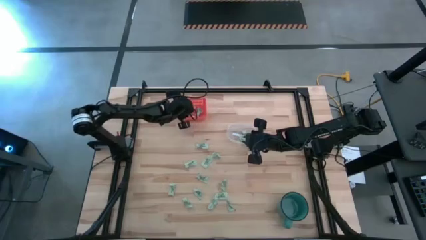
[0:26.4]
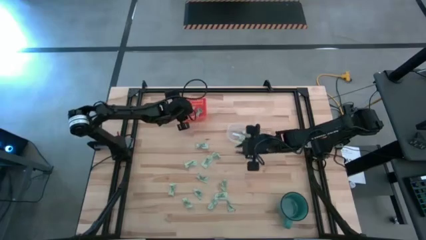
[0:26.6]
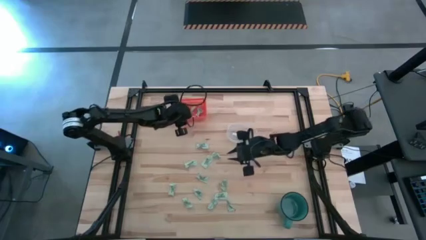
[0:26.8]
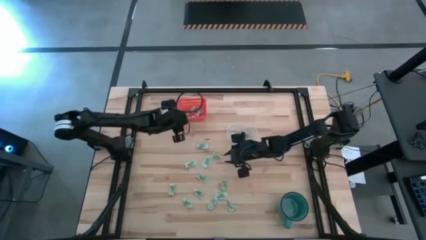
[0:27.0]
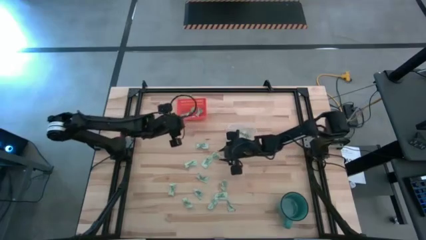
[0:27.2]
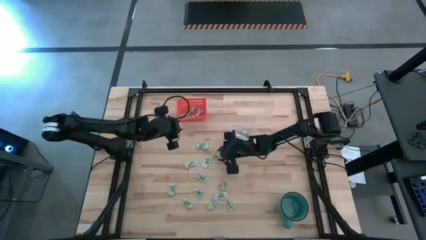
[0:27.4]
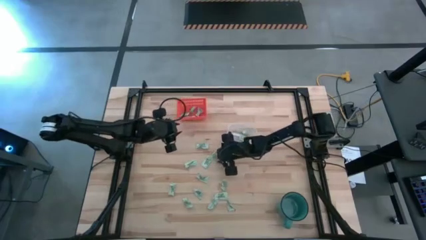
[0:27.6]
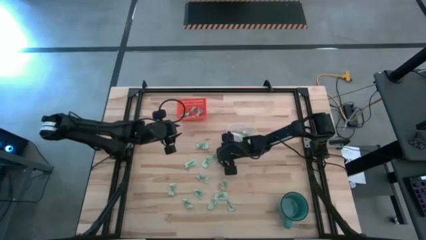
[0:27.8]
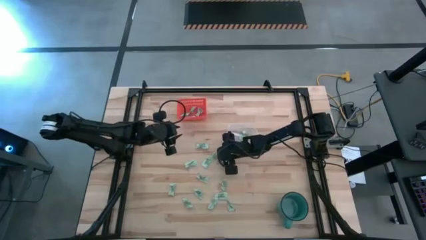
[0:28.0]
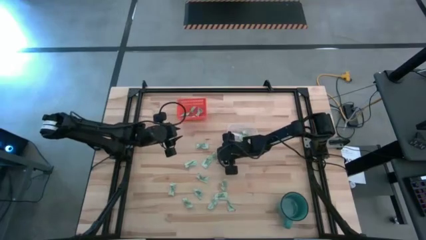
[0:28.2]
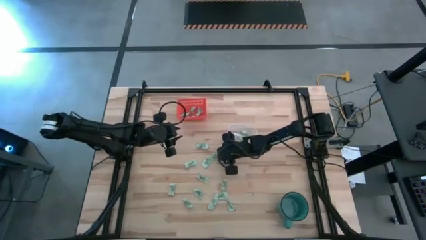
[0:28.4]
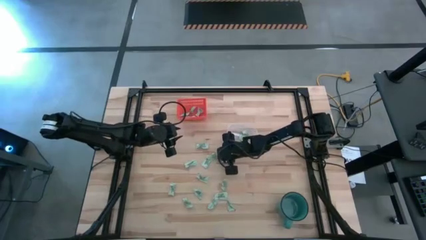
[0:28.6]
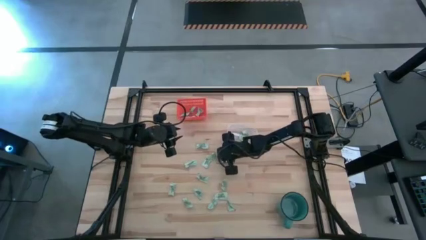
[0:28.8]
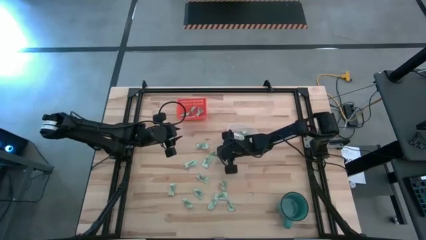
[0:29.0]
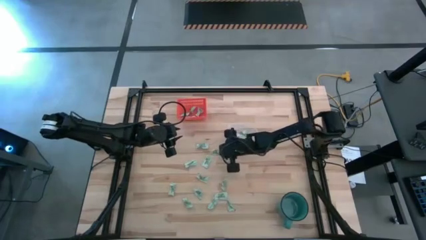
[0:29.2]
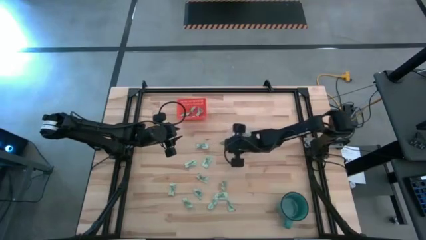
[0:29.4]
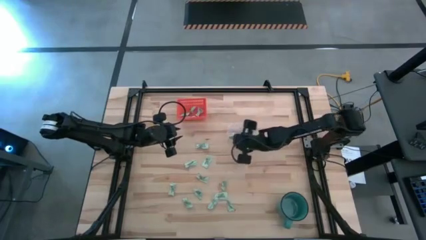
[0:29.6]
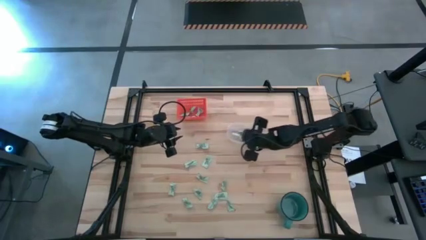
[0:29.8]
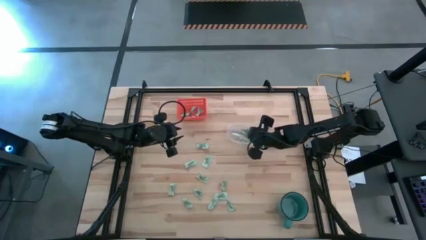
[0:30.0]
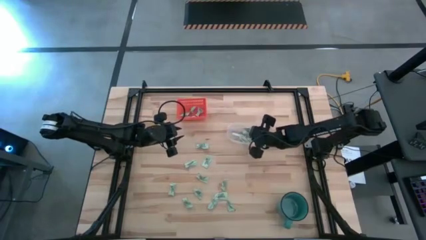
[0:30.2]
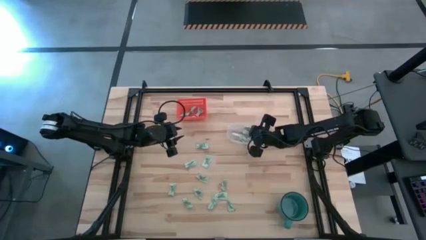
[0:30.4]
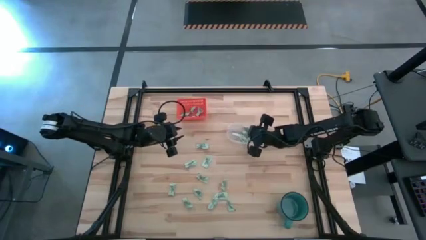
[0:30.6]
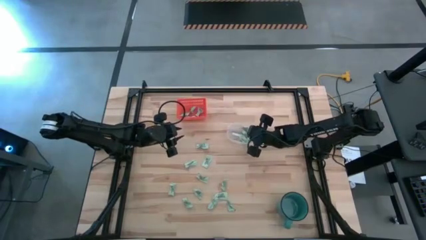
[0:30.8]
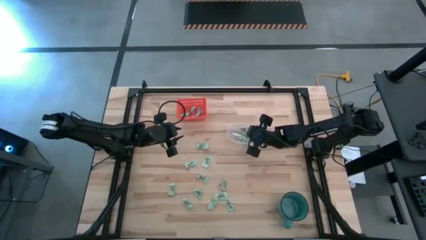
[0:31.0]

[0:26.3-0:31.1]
Task: Pick and place items into bin
Put the green stevia packet into the transparent bin

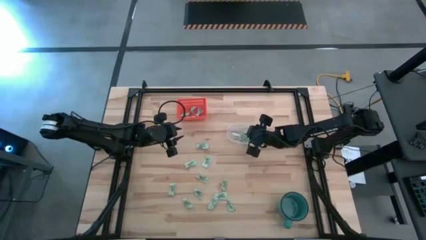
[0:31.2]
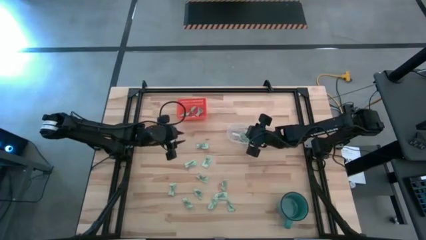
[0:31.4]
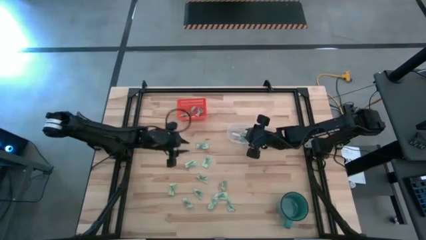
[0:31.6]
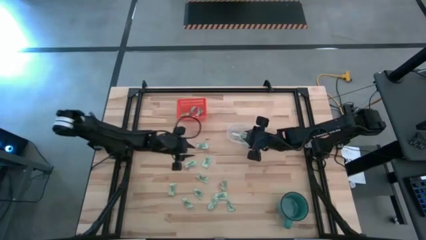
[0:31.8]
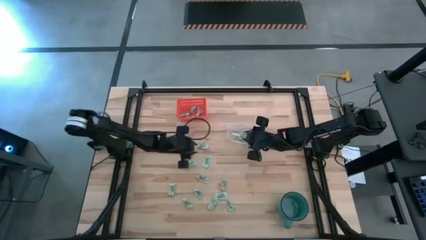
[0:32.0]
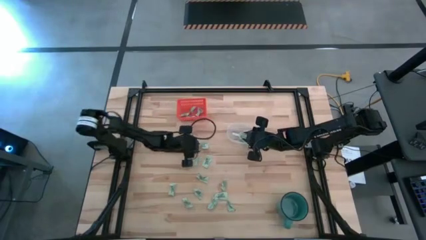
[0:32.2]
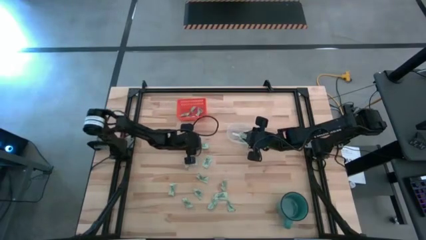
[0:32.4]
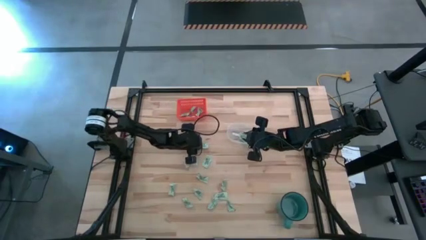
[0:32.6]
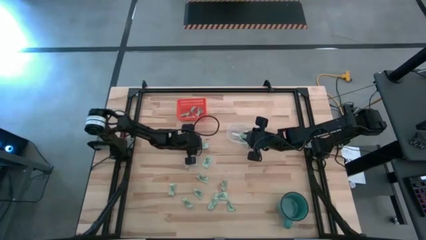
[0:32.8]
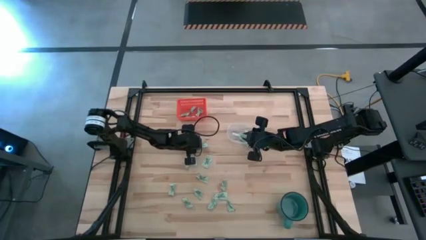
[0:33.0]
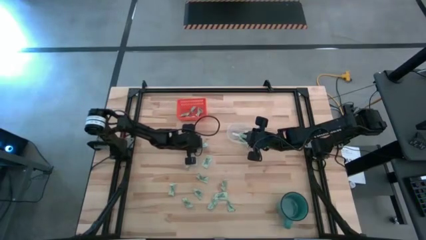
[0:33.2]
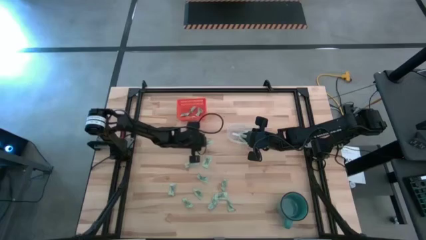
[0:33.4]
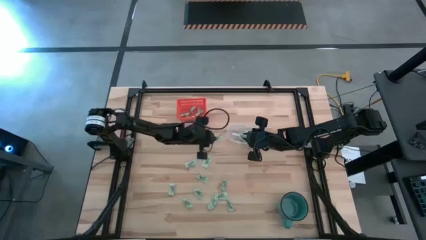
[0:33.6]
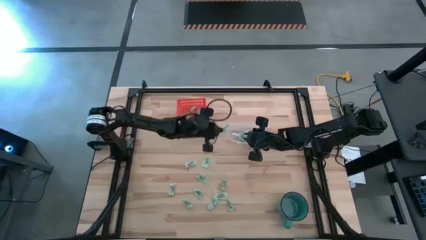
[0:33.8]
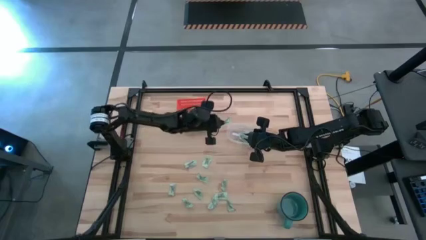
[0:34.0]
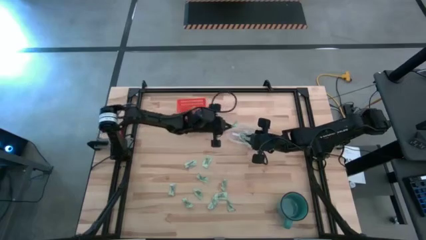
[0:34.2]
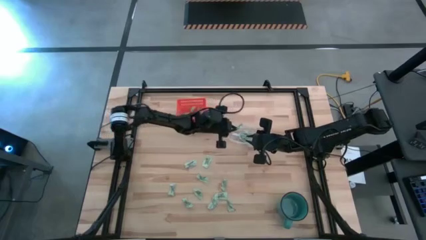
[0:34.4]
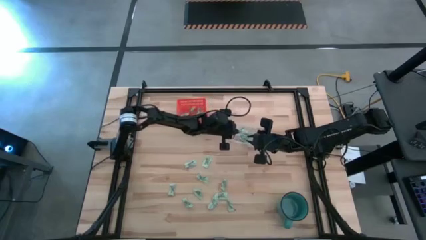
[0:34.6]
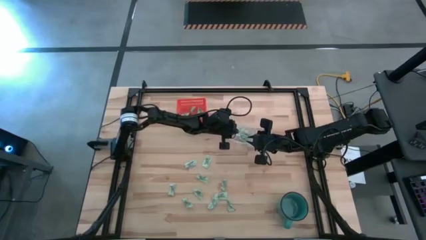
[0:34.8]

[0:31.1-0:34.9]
Put the green stevia packet into the transparent bin

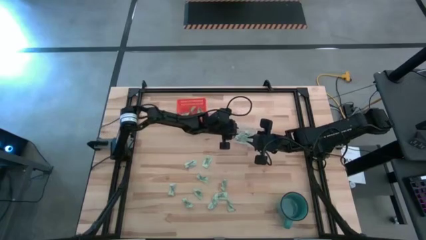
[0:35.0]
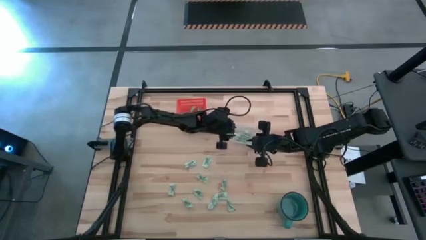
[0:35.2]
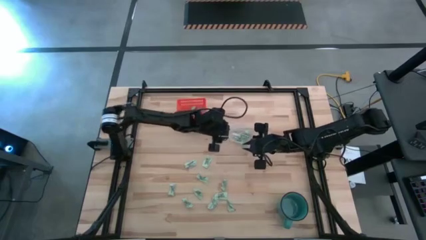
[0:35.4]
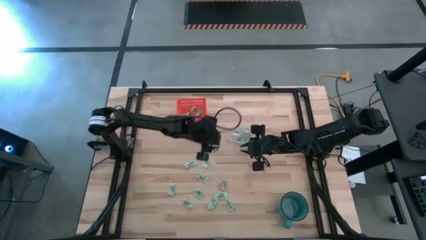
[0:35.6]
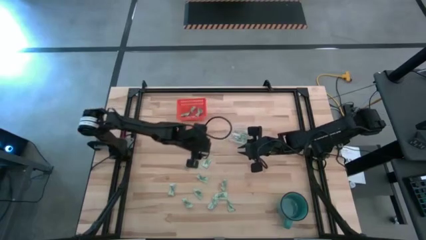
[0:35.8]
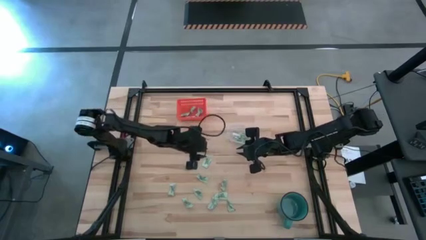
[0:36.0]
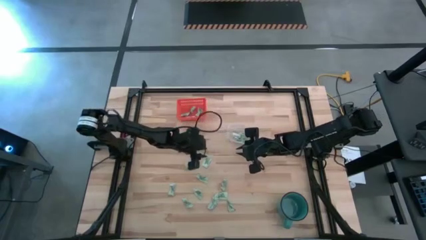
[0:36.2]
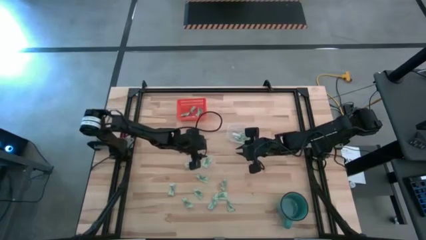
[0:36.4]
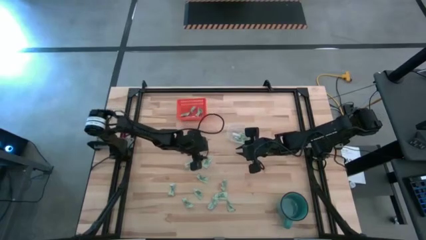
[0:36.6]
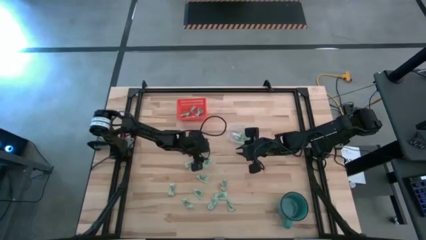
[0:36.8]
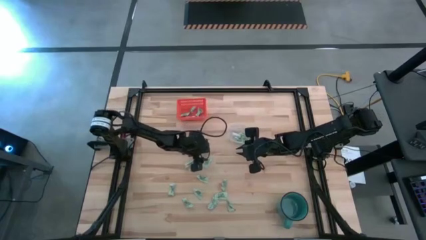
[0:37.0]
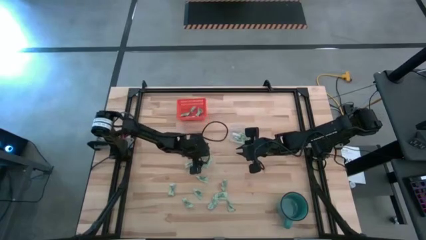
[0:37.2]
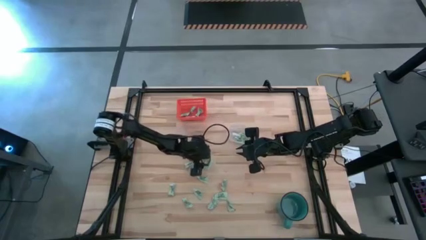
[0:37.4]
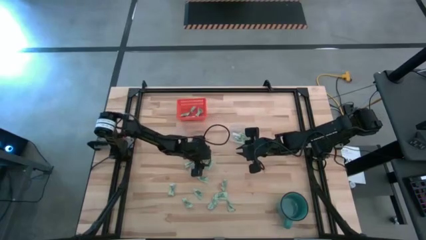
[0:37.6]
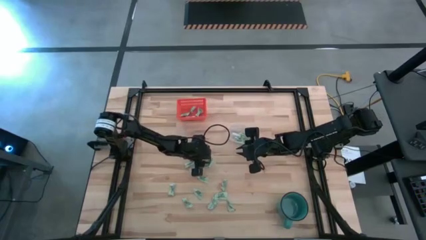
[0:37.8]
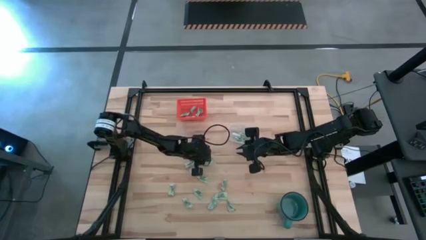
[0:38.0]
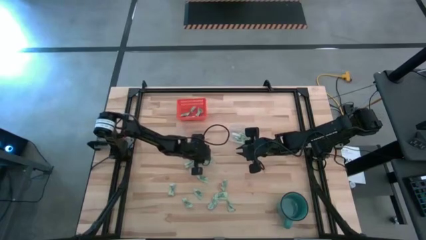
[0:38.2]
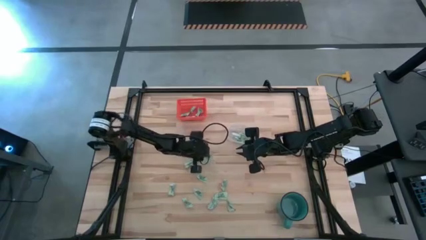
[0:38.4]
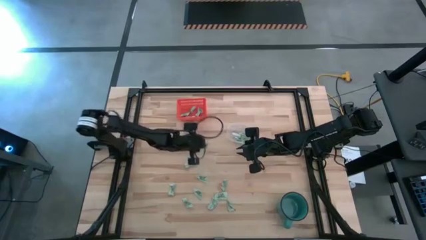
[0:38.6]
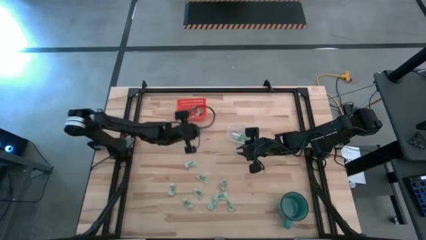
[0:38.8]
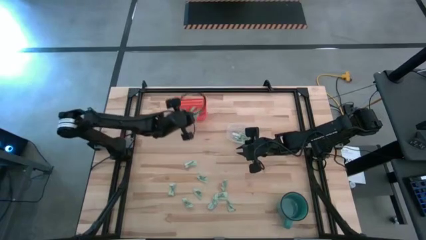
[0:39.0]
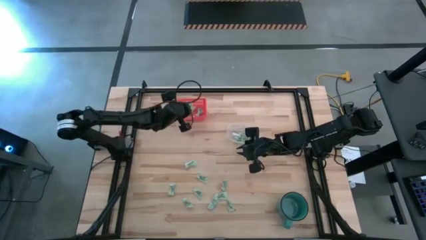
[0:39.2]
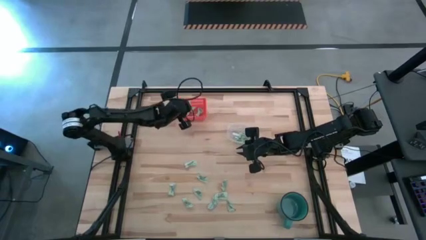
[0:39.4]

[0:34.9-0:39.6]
Put the green stevia packet into the orange bin

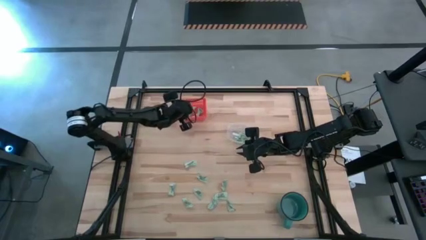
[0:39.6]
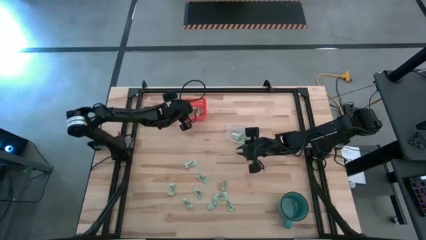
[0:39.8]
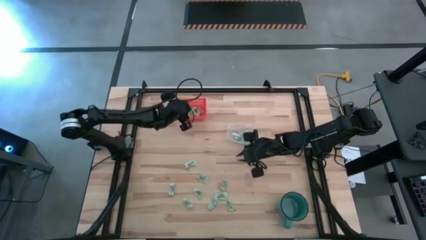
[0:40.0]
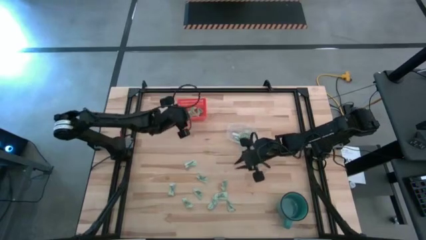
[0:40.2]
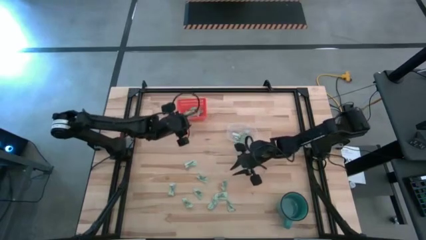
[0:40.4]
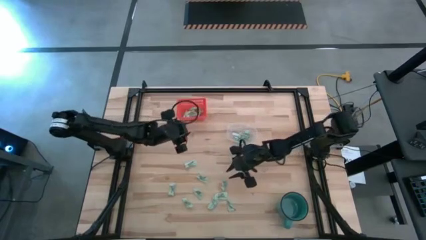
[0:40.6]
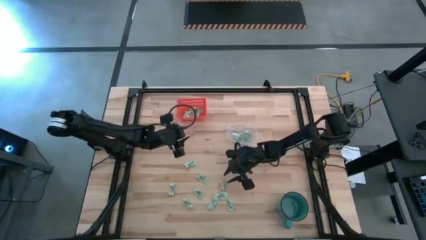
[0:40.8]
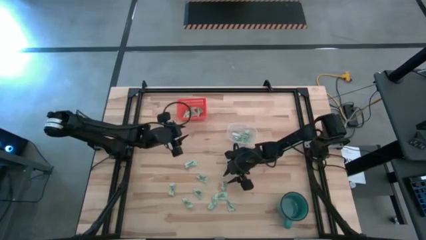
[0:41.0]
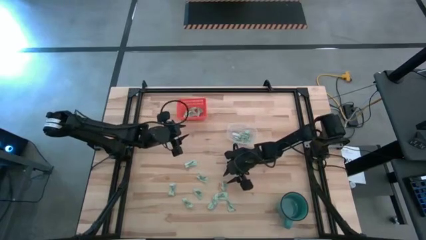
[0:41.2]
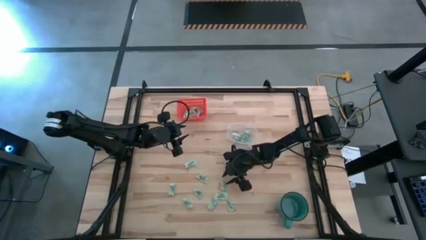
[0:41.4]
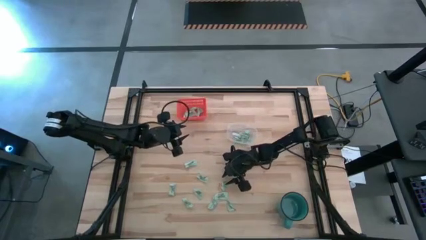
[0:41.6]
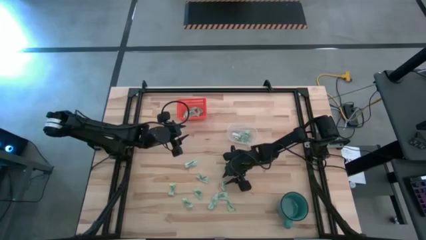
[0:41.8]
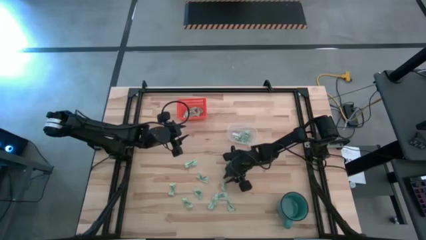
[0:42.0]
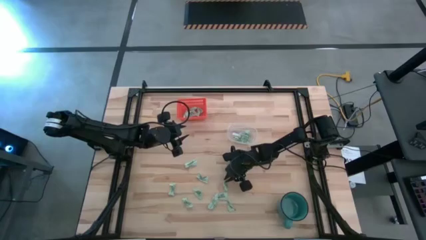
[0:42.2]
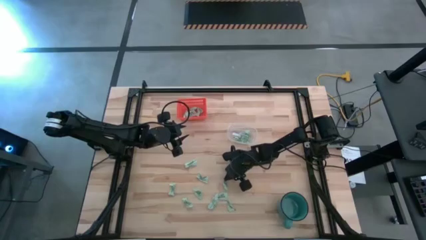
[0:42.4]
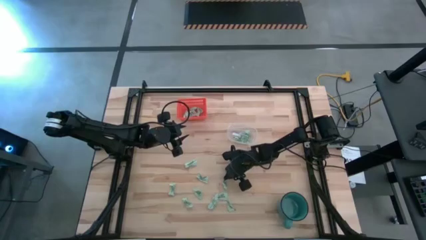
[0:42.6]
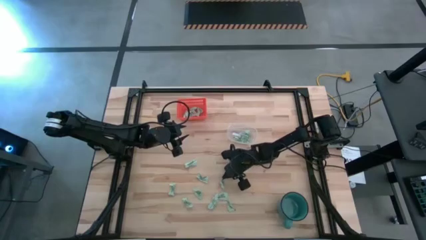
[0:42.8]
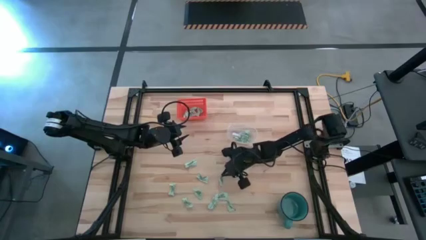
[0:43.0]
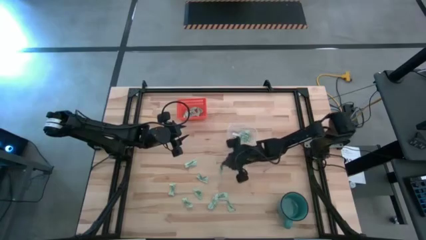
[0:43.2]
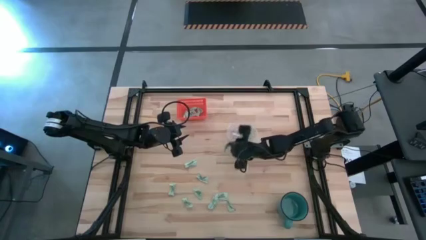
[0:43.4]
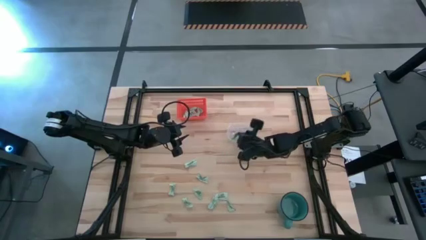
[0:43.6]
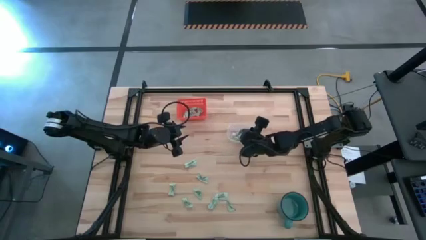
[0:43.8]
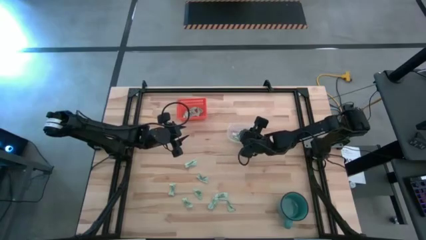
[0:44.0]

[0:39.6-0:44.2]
Put the green stevia packet into the transparent bin
